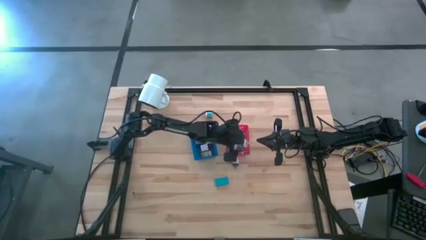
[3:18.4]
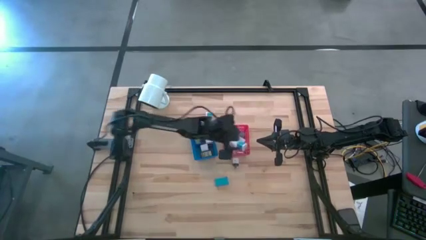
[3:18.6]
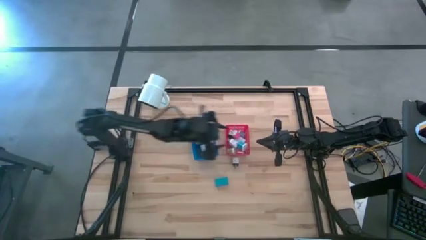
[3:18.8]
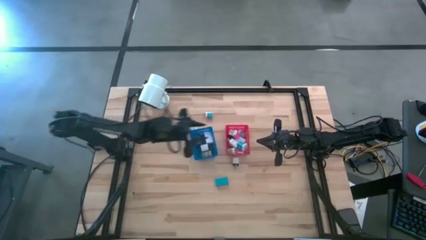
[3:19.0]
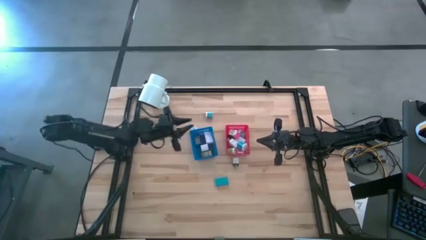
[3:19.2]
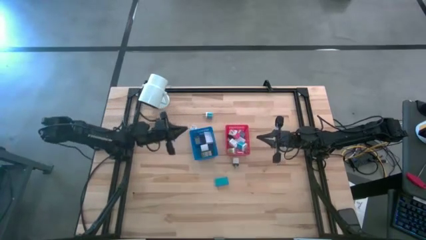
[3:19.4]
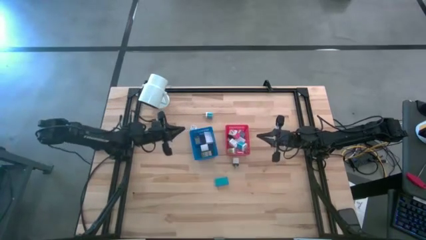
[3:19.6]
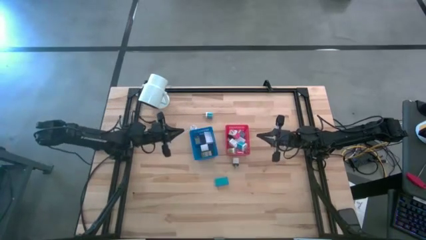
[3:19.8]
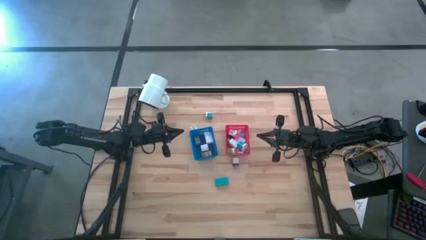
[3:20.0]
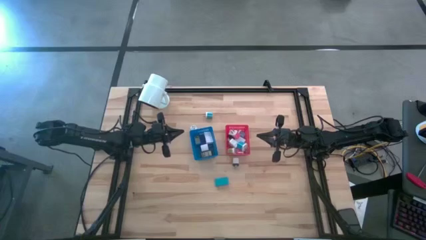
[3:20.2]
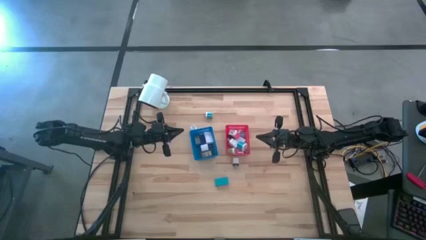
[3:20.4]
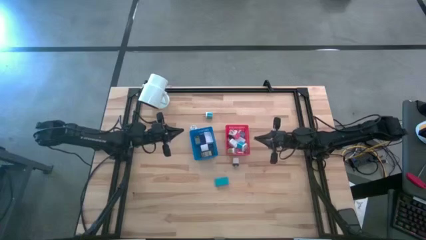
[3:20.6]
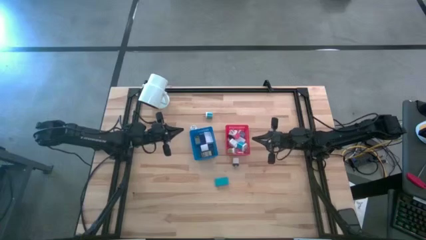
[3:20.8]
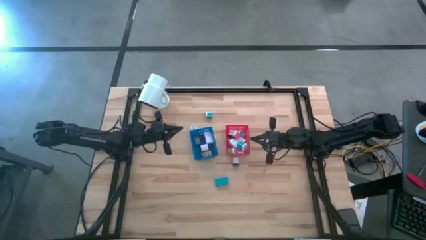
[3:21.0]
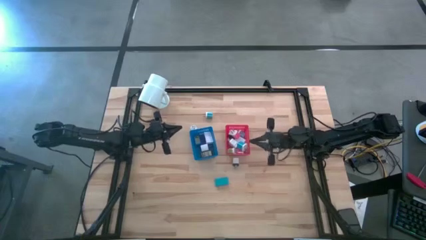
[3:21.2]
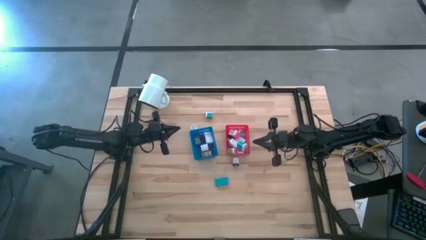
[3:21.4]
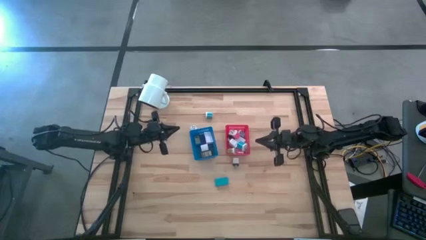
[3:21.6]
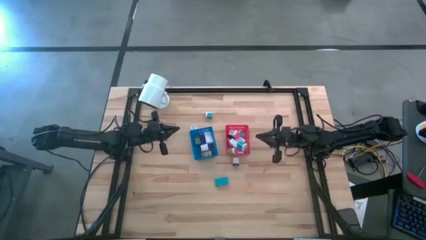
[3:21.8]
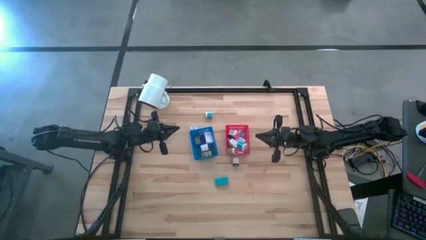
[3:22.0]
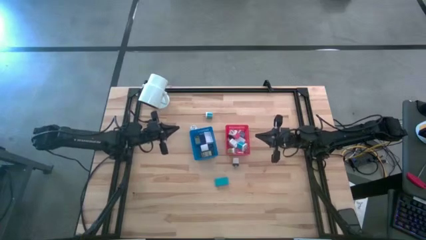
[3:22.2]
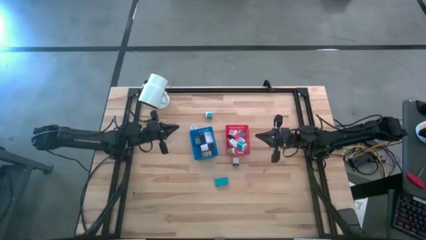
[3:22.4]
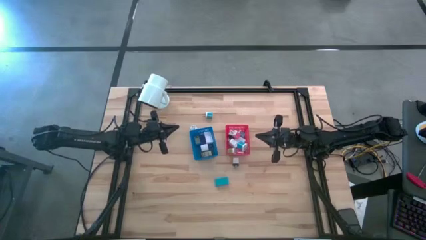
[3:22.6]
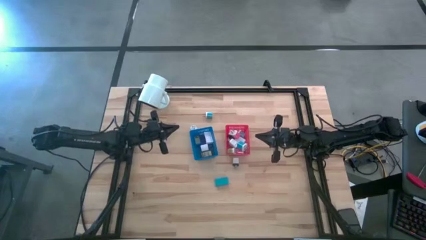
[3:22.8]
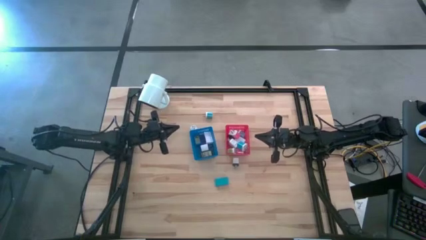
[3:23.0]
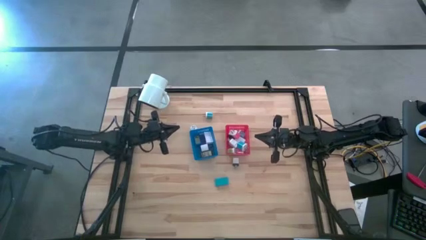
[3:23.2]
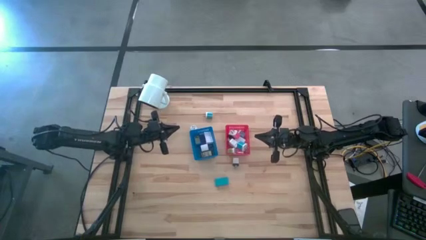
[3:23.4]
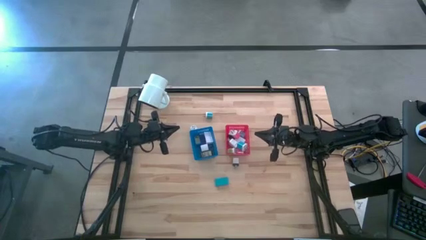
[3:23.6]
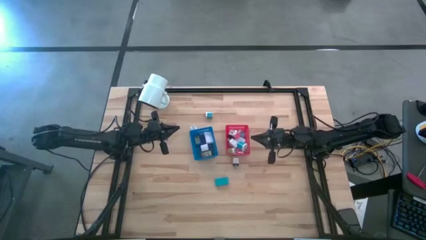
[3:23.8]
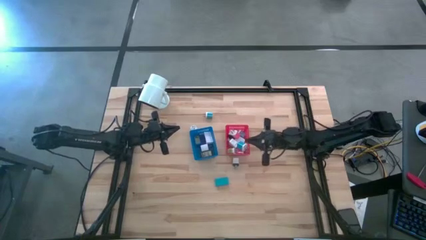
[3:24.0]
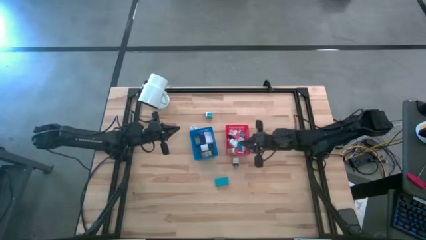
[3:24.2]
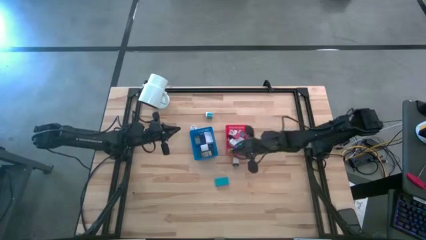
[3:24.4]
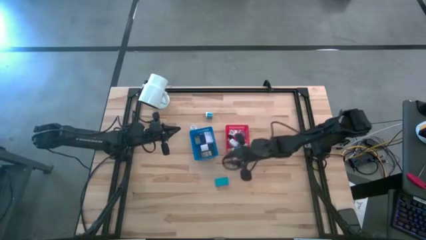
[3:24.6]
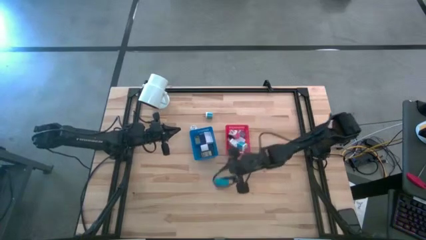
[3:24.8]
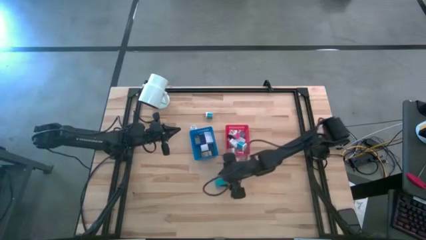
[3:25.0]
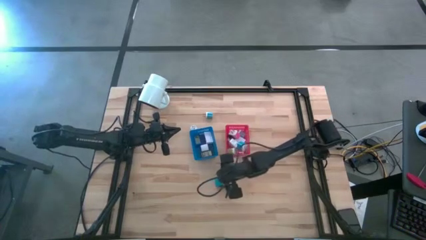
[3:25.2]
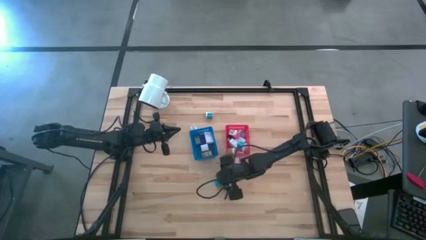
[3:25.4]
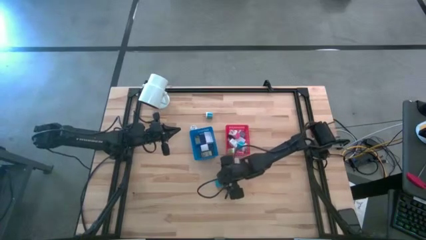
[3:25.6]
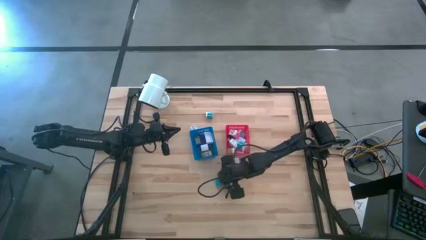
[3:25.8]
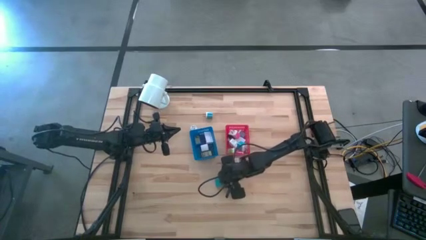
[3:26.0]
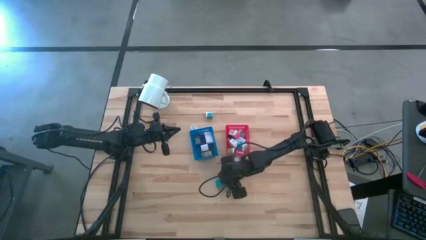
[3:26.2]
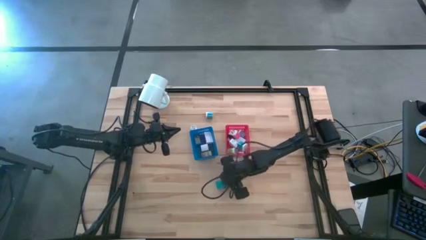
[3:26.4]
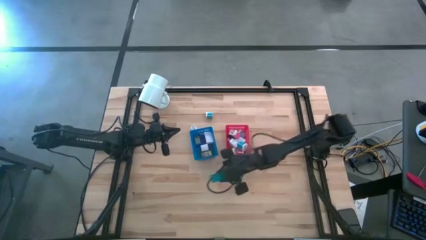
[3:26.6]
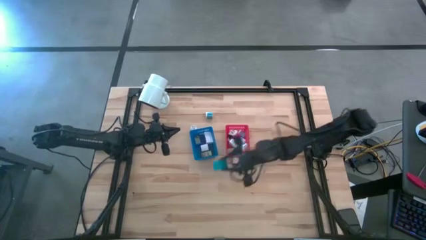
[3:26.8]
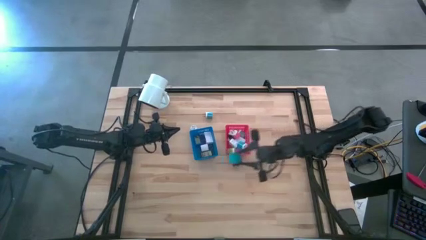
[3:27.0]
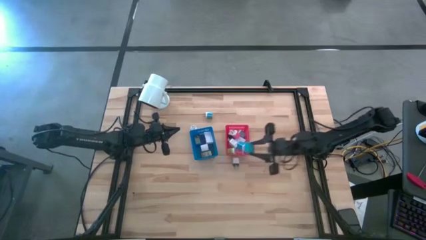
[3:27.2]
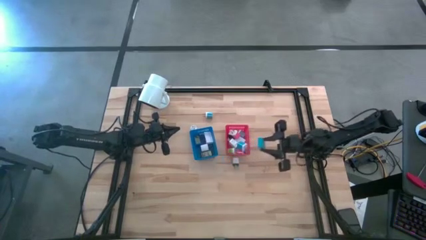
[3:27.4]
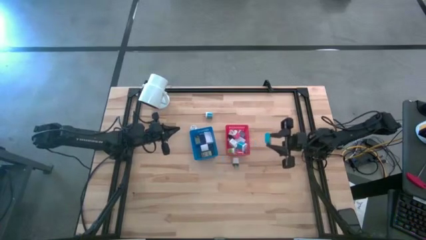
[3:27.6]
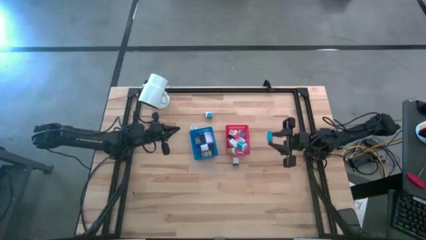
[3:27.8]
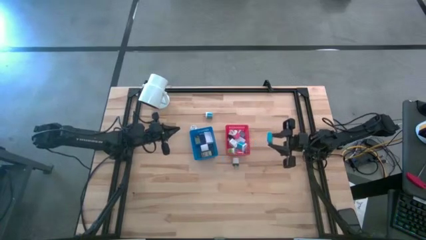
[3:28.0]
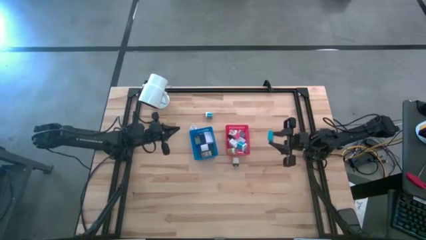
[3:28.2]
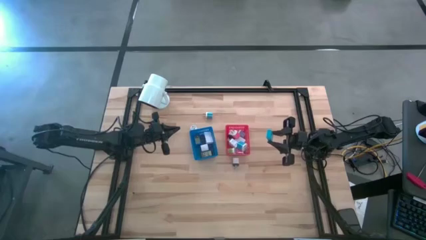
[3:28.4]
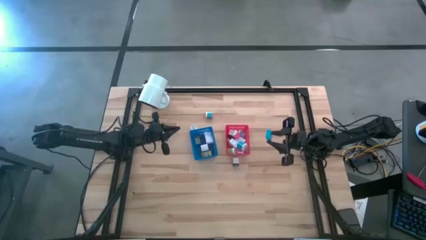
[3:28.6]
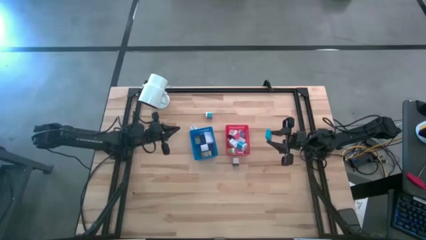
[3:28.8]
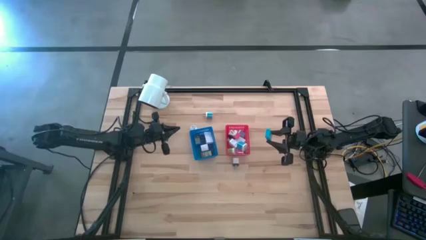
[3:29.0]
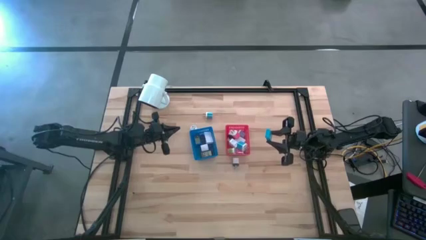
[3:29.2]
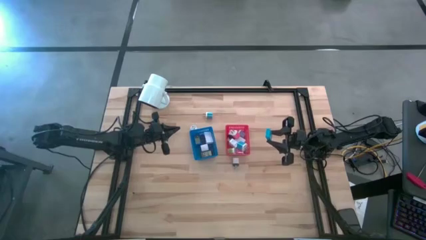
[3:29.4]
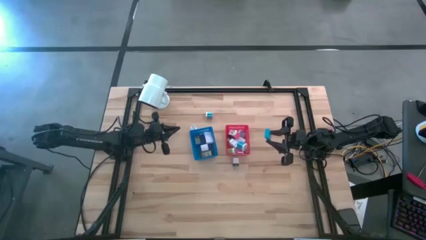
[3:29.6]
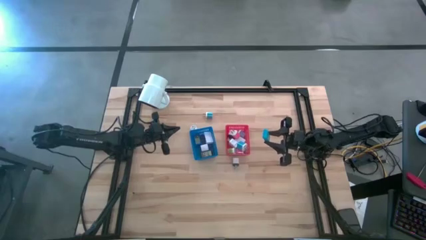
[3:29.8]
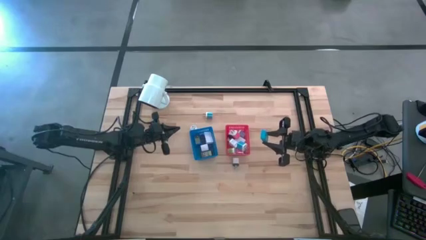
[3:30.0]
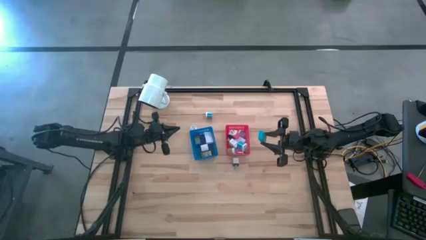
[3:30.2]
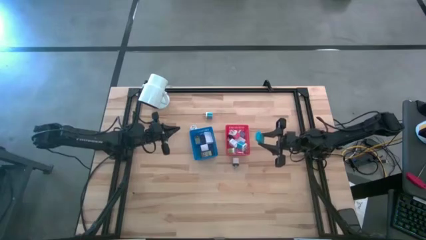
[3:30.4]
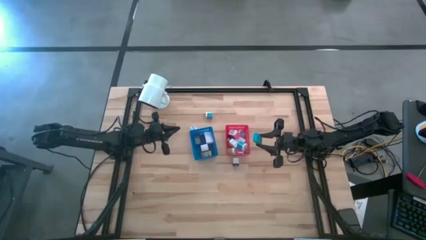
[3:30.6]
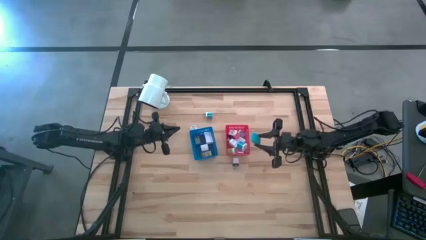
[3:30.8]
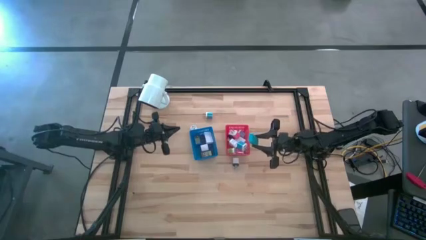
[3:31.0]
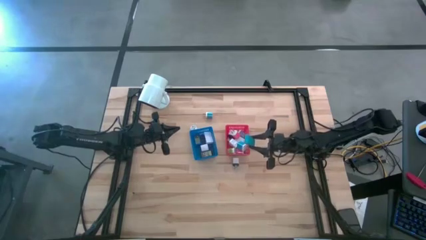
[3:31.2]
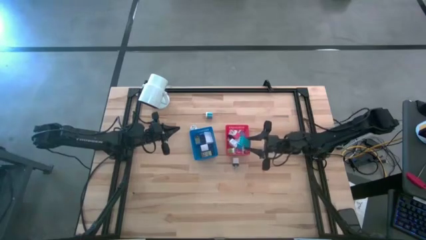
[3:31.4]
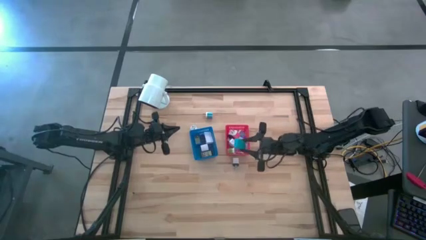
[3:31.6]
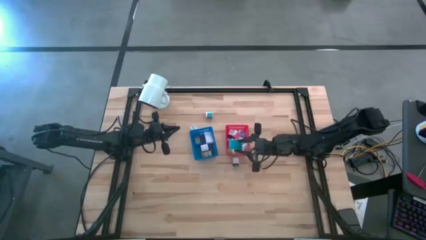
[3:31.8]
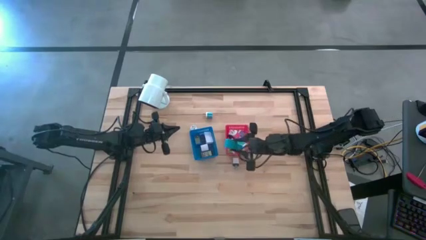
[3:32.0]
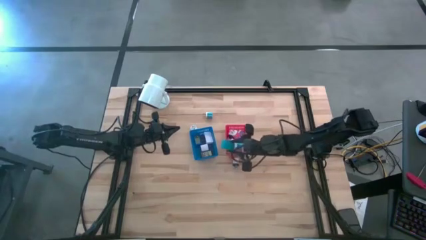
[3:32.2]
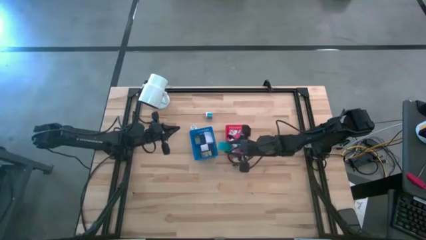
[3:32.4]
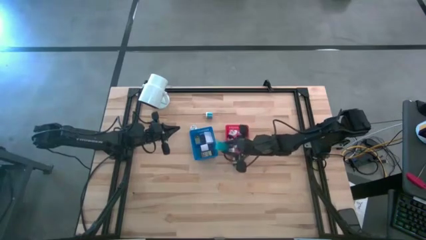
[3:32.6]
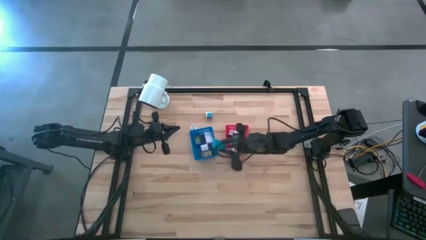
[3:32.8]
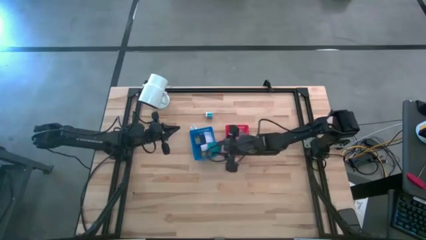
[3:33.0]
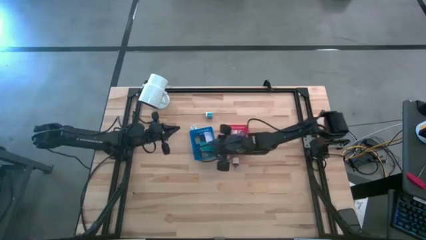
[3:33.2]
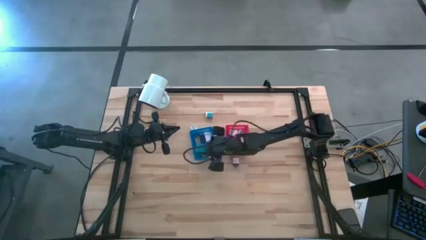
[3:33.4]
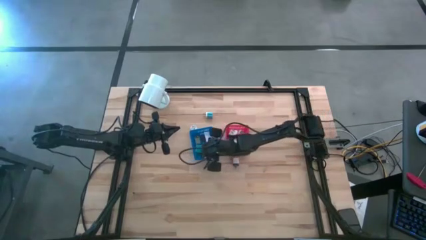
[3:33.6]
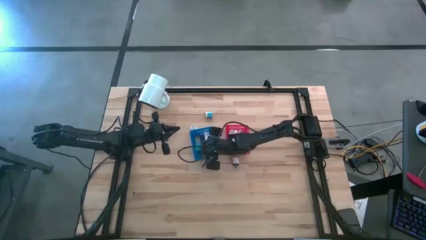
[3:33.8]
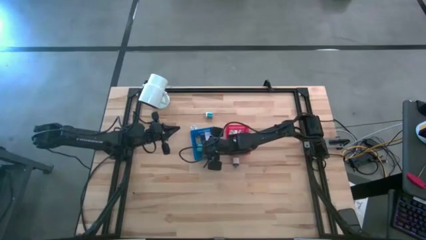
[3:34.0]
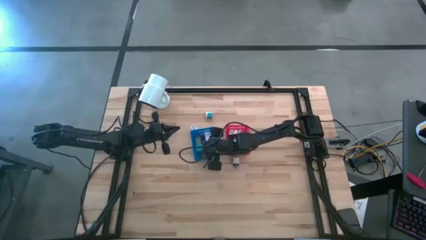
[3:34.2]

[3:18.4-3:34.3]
Task: Pick & Place Office items
Put the light blue digital clock into the blue bin
